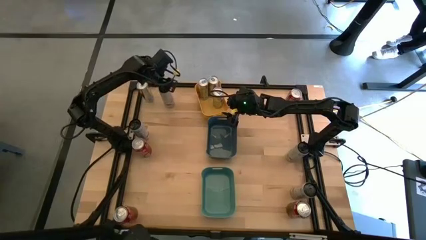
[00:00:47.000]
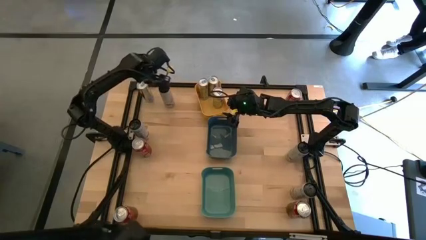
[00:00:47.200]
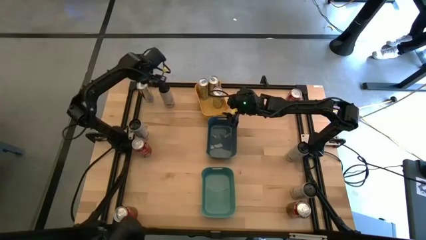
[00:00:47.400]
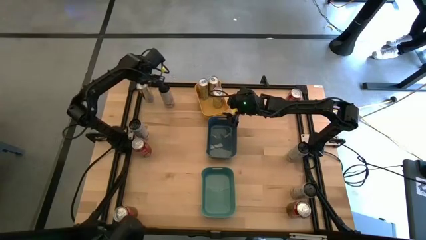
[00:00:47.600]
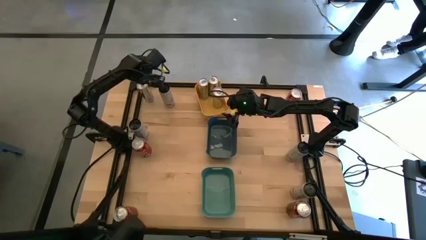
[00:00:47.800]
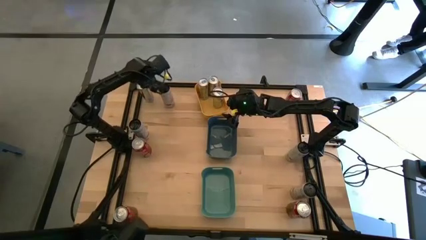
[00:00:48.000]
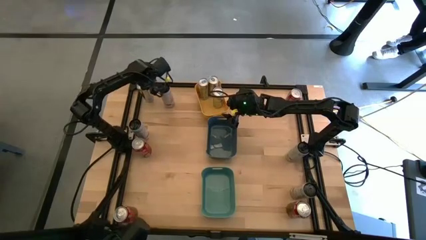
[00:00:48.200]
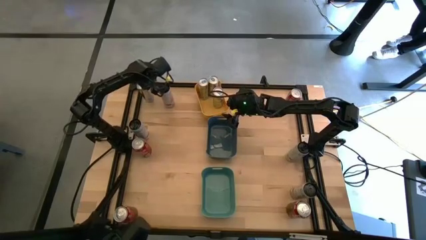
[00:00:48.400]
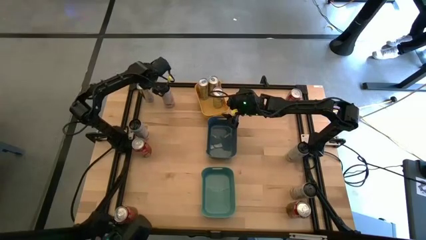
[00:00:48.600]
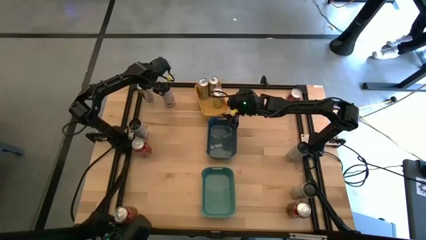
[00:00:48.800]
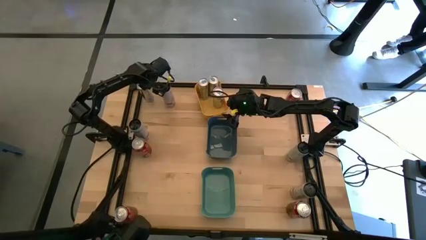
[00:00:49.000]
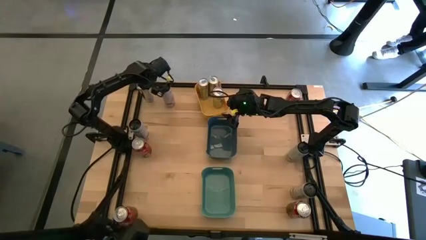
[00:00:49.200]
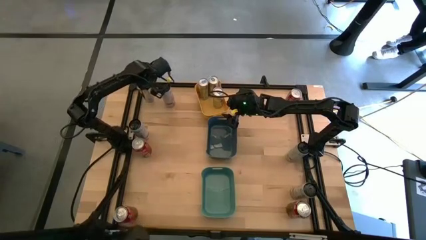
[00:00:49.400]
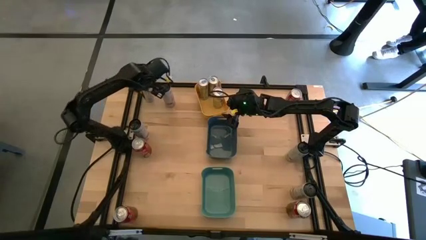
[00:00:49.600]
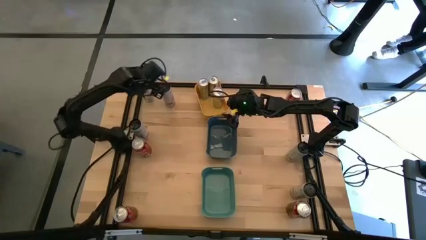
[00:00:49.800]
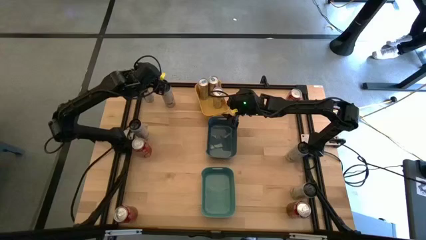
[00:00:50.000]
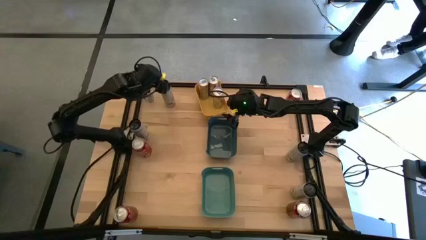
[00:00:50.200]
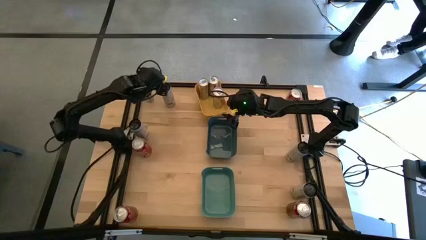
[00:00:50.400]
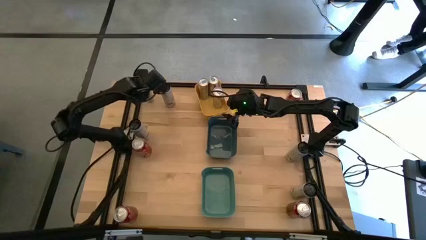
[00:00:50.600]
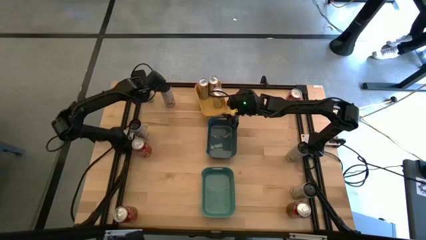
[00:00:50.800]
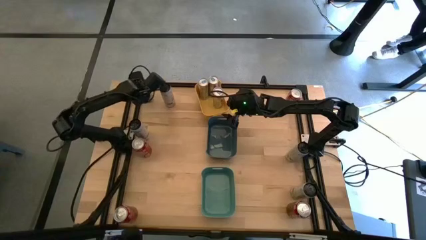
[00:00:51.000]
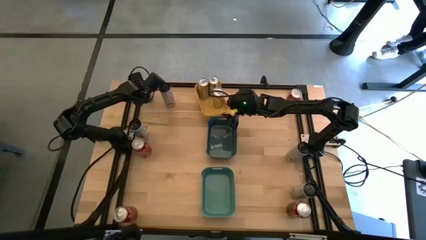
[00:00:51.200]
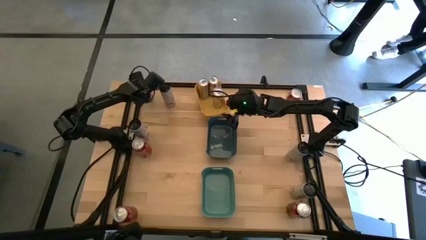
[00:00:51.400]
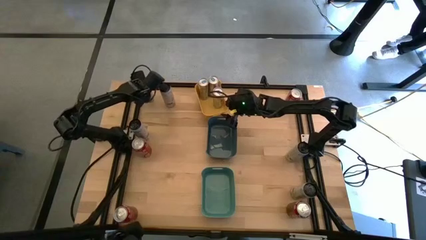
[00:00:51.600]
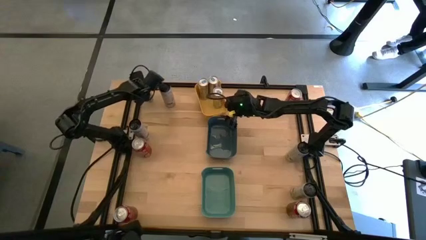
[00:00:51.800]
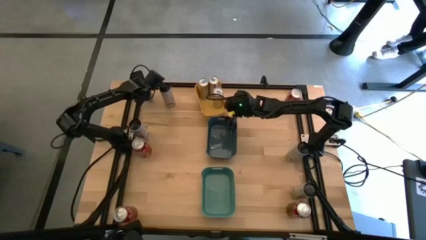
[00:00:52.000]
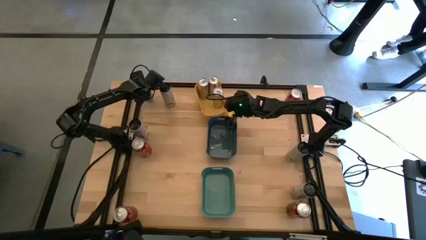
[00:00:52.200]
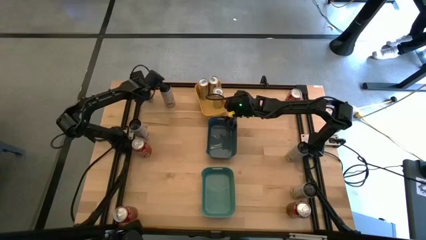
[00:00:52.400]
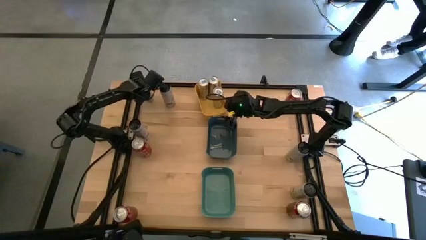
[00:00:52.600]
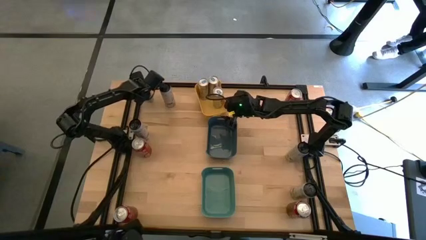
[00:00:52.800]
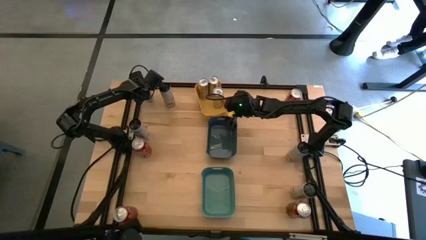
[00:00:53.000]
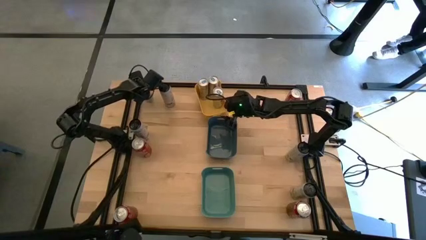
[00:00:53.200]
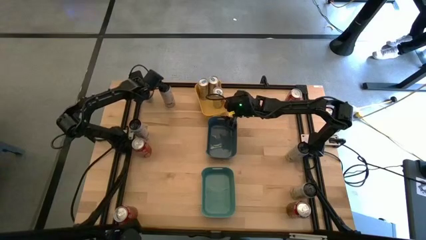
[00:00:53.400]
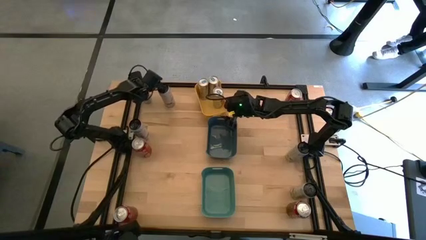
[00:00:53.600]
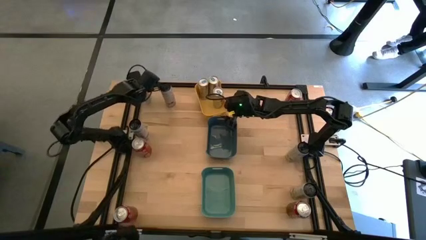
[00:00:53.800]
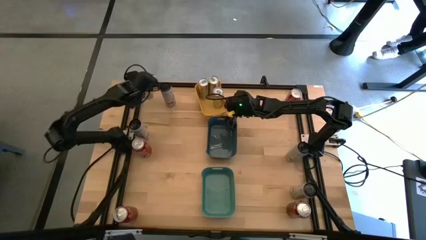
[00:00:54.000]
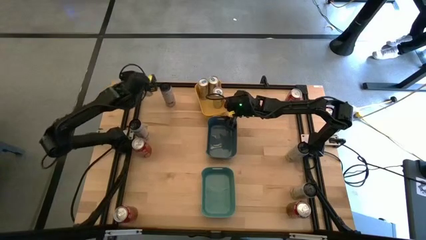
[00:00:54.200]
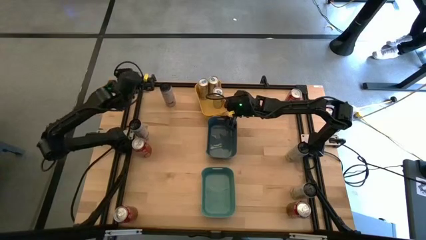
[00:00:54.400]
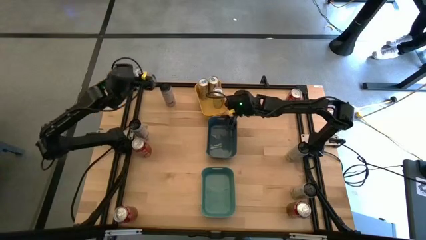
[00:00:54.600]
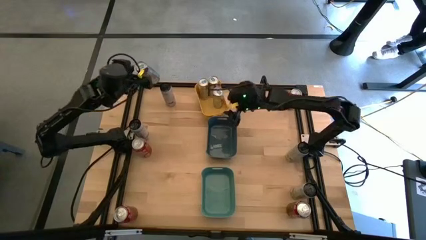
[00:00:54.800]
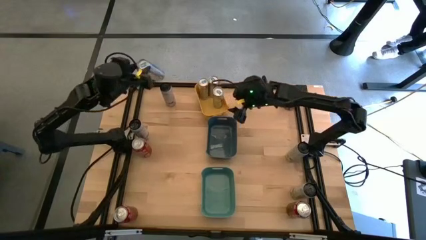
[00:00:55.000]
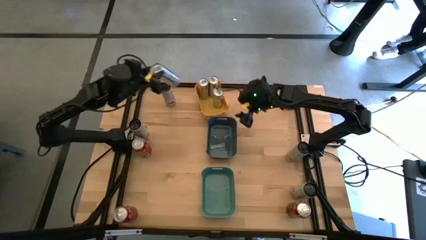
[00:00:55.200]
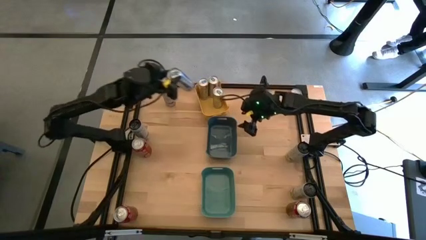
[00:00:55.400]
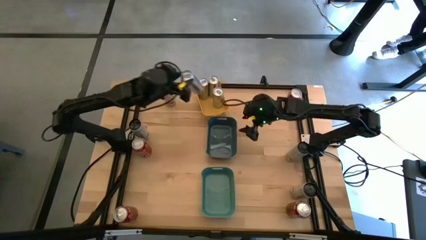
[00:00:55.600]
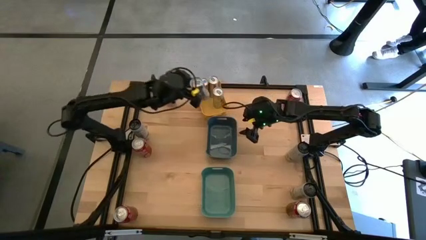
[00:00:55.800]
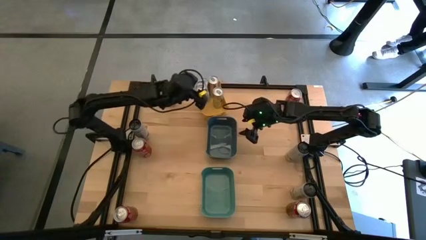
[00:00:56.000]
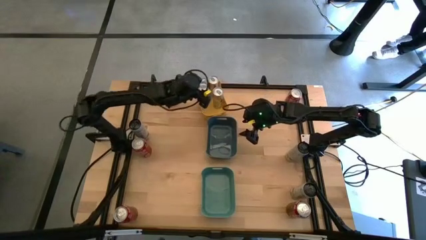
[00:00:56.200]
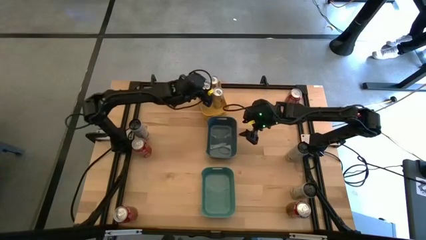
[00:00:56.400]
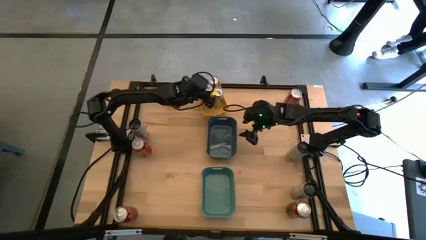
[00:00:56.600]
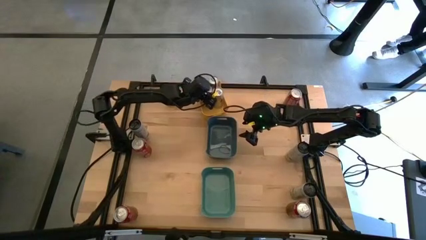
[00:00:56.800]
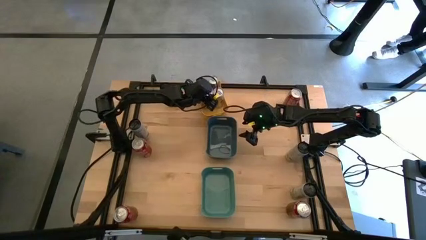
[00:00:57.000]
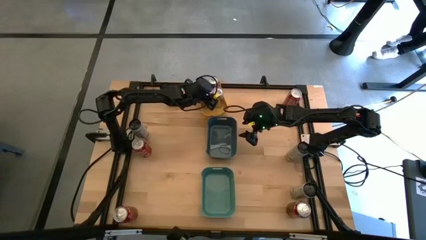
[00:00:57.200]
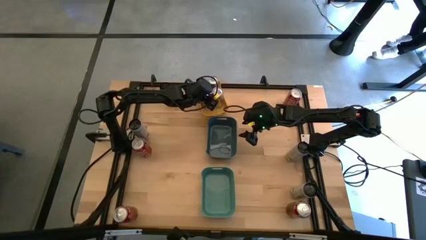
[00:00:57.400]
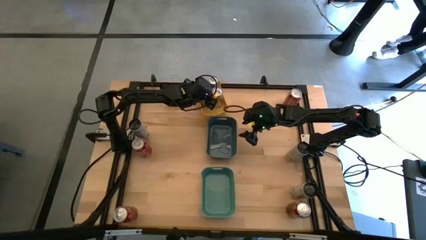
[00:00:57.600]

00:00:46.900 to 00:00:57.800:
Task: Sort soda cans
Put the blue soda can into the yellow bin

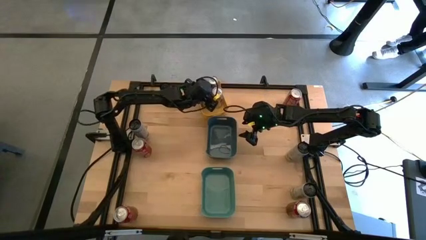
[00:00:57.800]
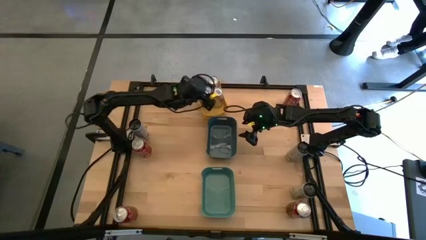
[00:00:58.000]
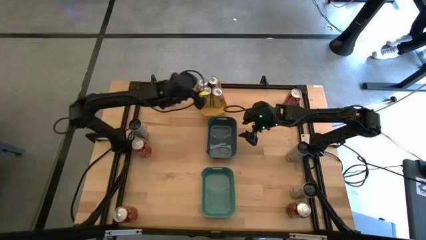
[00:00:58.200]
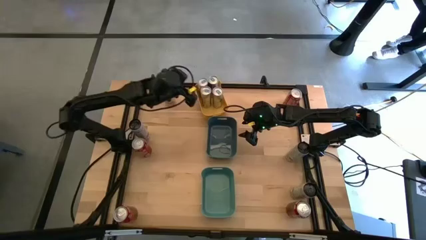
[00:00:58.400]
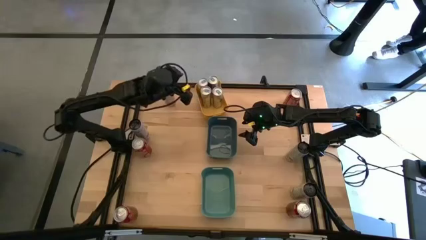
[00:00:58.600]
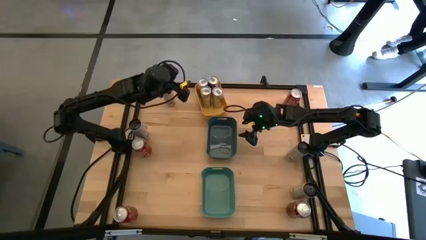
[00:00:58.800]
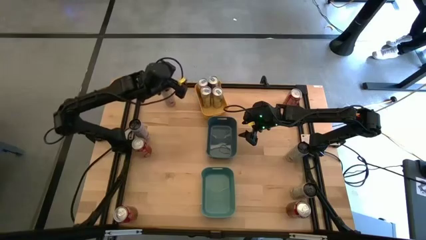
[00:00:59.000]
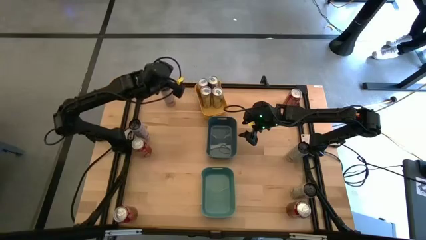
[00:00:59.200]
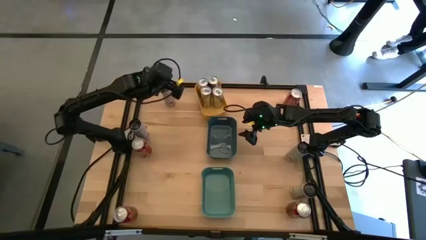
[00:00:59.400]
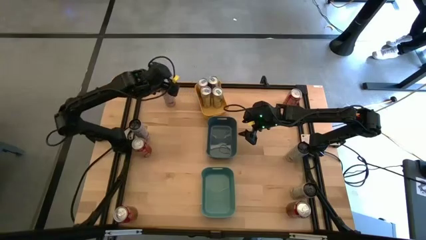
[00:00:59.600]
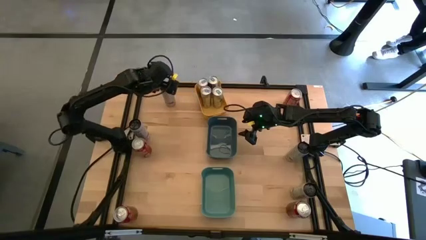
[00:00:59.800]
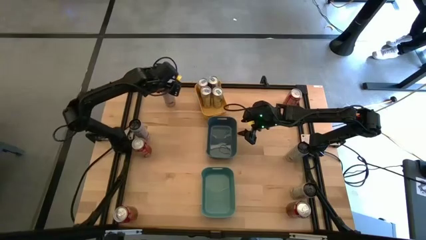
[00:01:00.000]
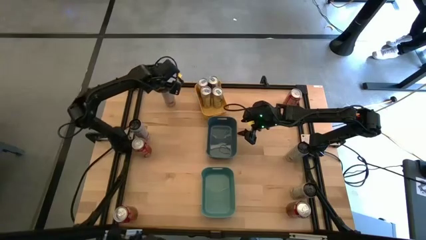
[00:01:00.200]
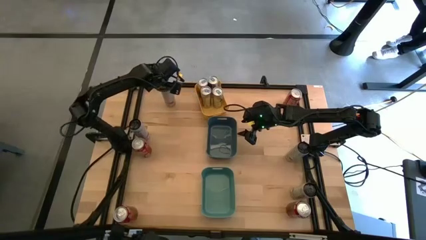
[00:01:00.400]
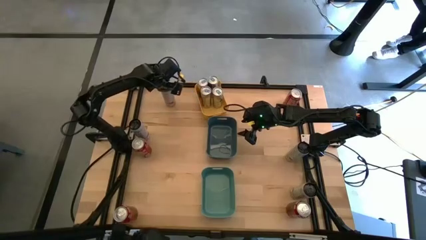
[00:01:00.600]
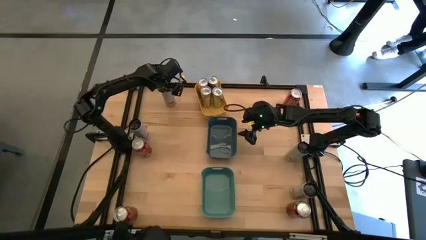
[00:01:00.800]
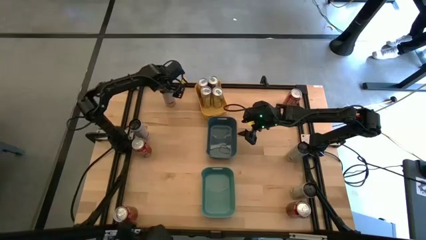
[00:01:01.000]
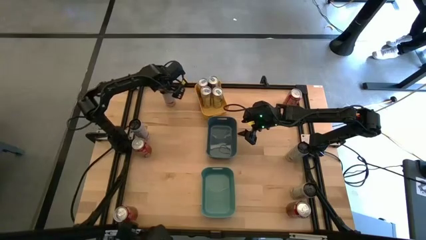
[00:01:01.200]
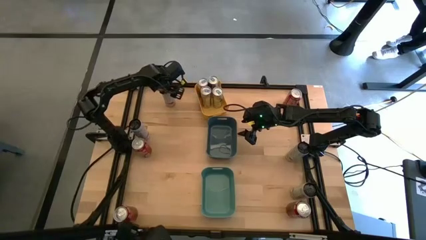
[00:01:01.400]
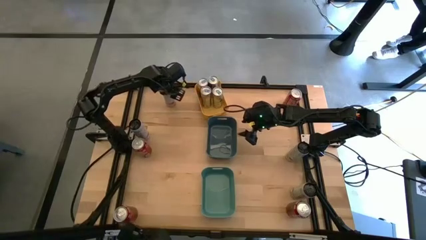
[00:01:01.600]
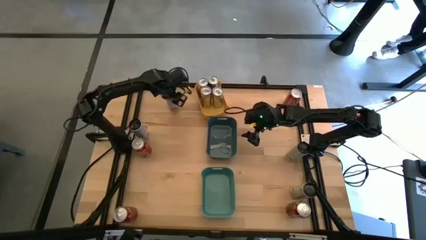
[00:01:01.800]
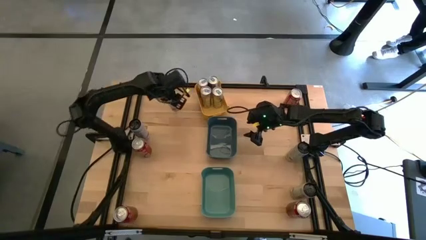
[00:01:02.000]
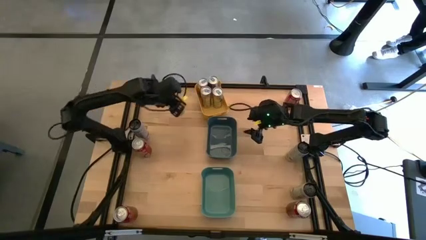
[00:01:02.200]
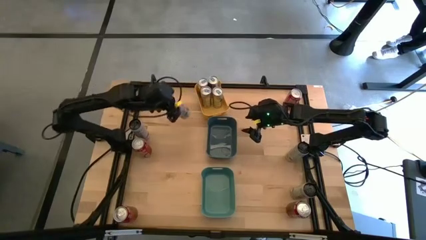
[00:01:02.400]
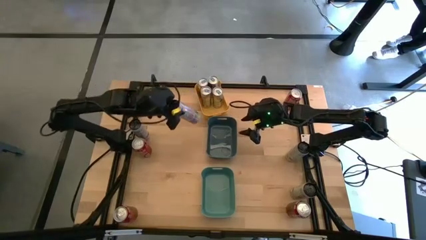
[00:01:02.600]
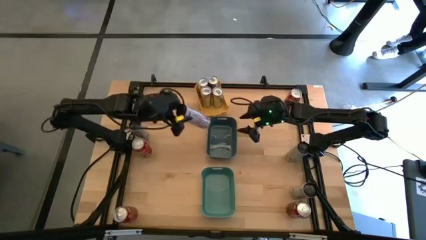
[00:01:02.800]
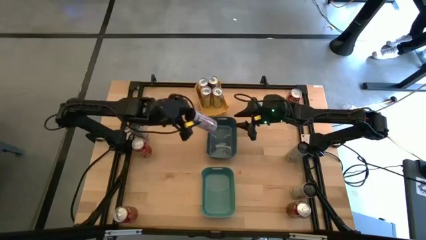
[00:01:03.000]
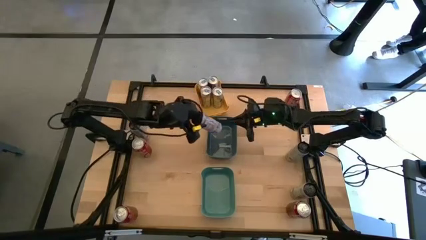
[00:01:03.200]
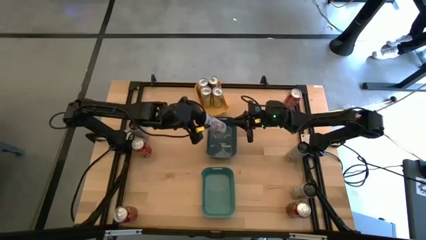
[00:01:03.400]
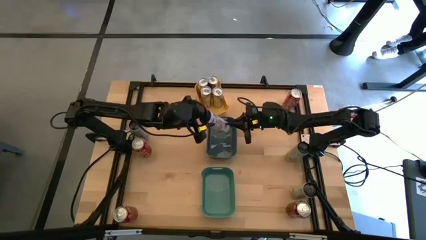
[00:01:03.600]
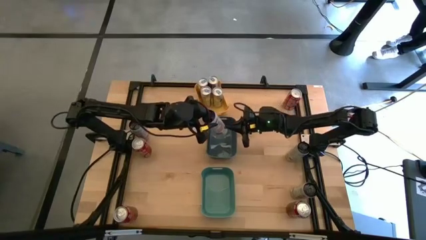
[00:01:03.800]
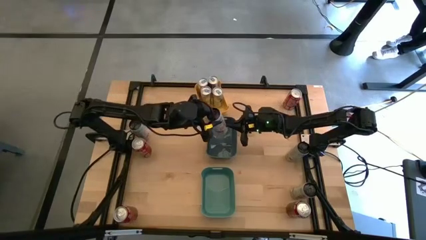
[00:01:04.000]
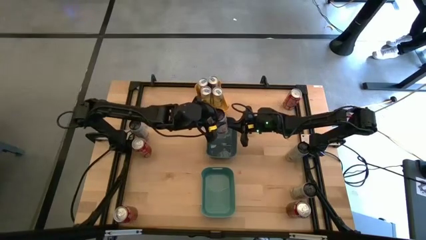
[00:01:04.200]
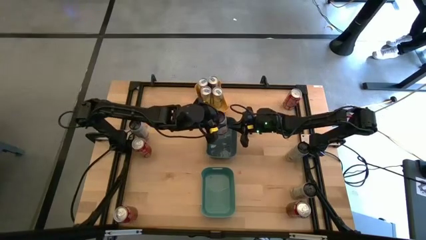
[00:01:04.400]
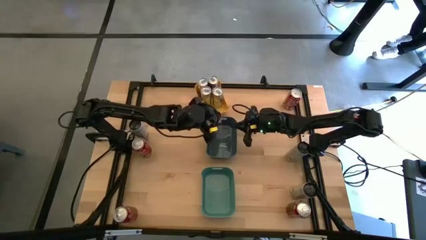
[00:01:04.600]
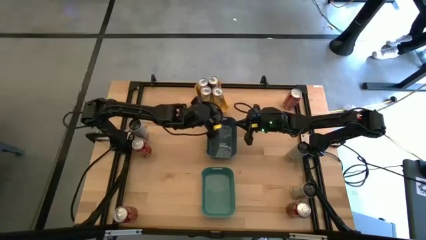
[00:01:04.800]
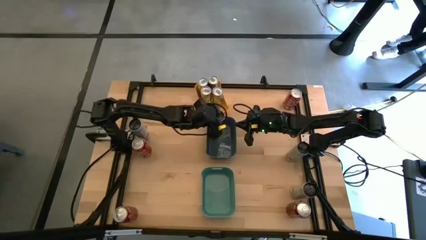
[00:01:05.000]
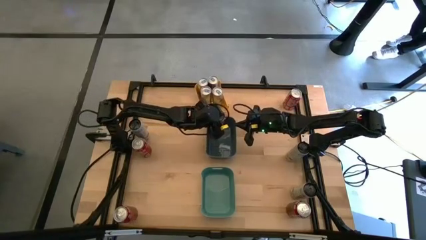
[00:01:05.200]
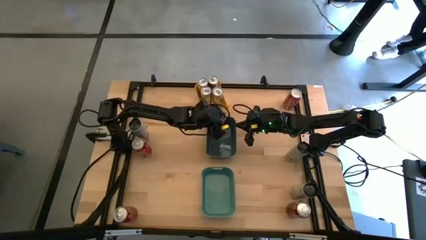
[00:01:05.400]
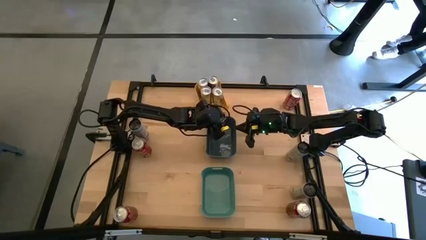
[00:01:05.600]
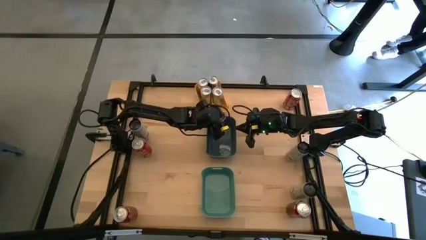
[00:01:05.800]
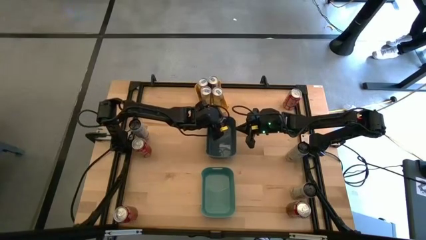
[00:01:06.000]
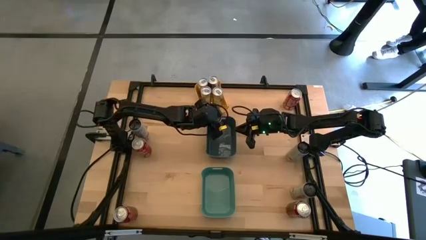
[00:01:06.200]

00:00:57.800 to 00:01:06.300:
Put the top black soda can into the dark green bin
